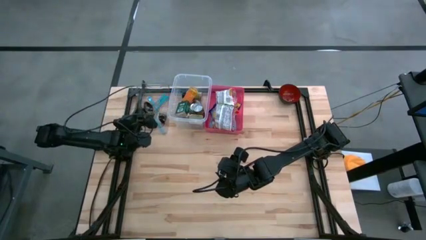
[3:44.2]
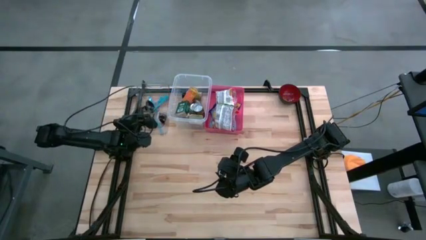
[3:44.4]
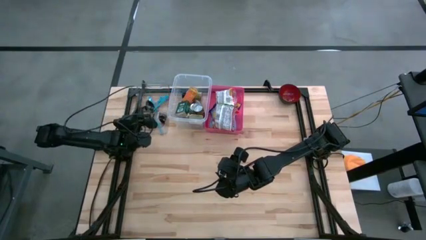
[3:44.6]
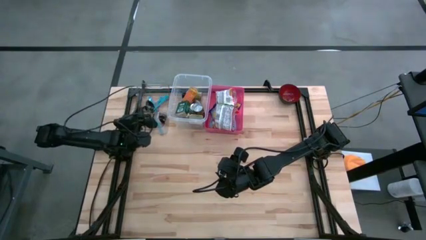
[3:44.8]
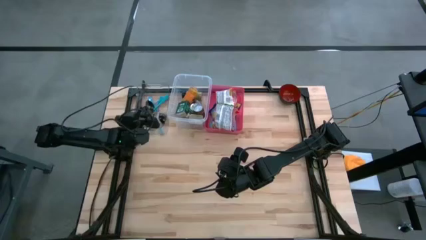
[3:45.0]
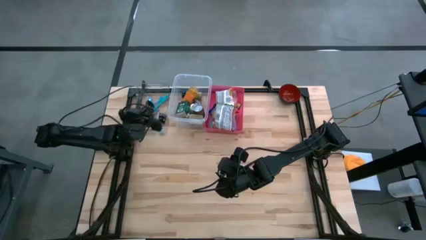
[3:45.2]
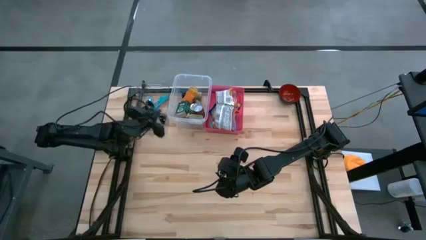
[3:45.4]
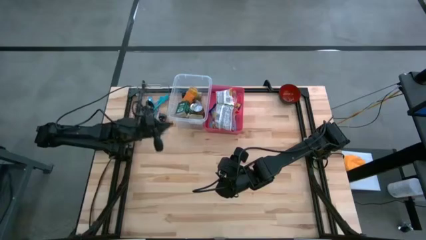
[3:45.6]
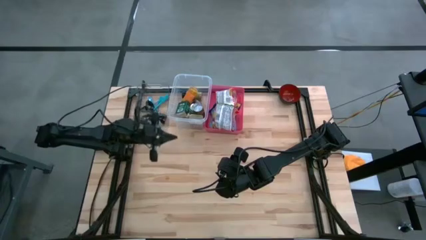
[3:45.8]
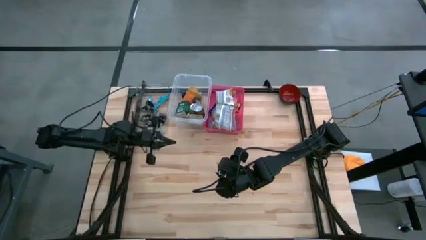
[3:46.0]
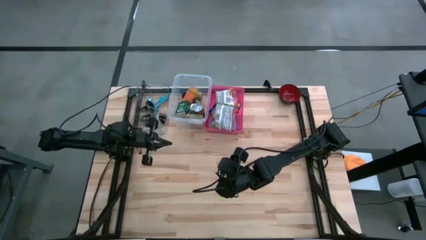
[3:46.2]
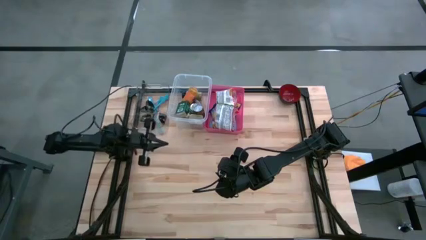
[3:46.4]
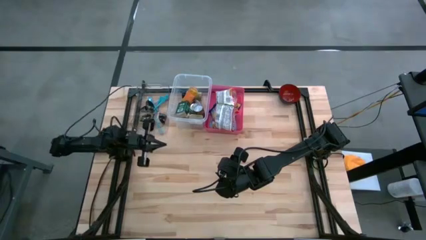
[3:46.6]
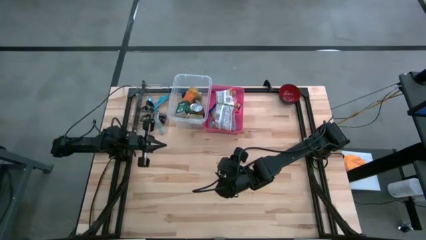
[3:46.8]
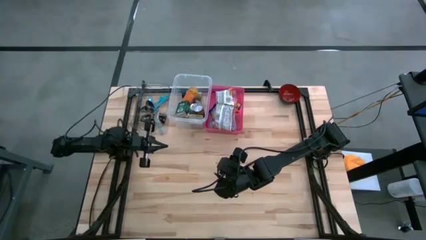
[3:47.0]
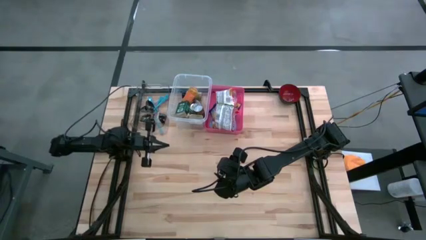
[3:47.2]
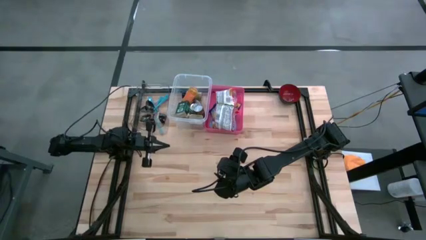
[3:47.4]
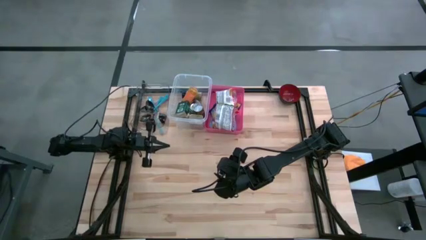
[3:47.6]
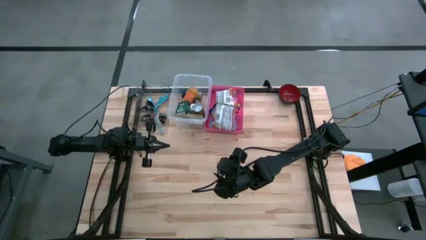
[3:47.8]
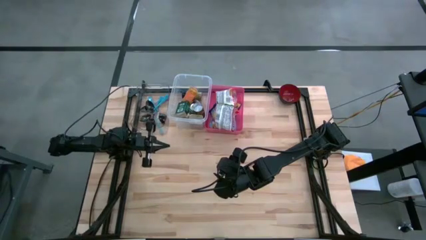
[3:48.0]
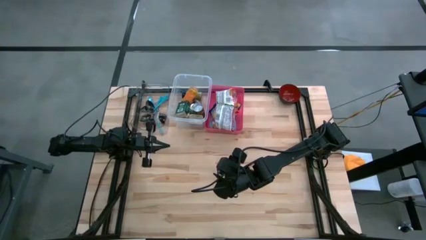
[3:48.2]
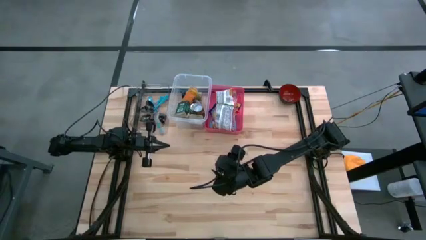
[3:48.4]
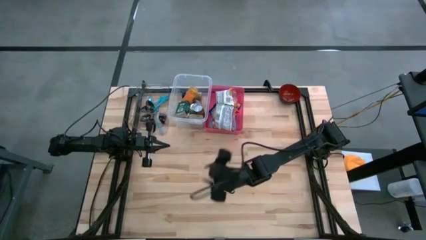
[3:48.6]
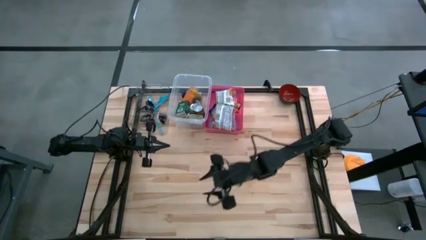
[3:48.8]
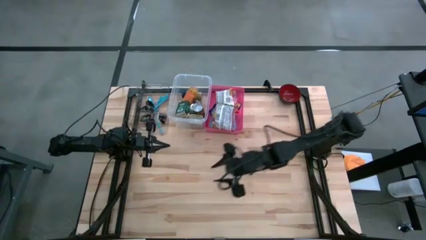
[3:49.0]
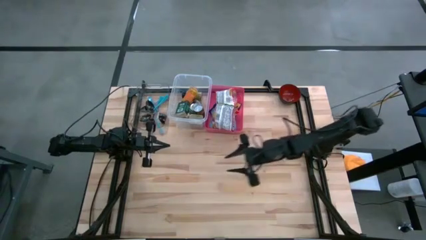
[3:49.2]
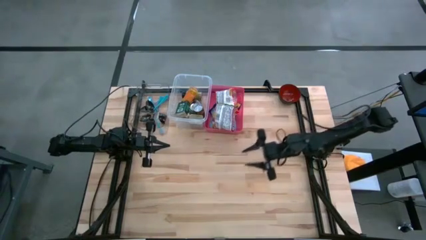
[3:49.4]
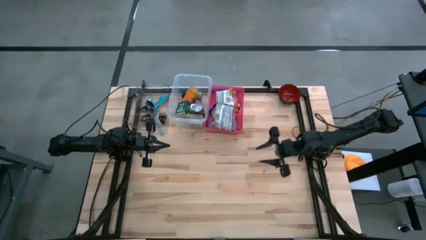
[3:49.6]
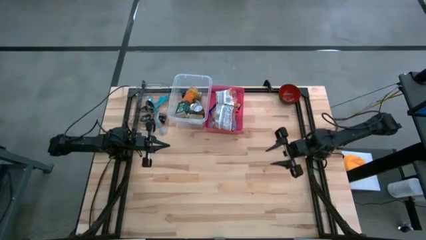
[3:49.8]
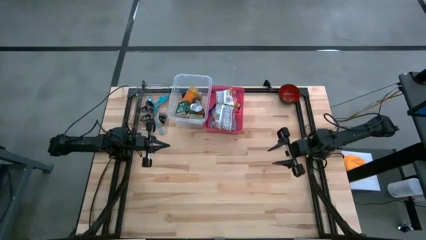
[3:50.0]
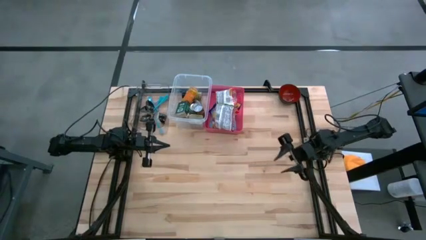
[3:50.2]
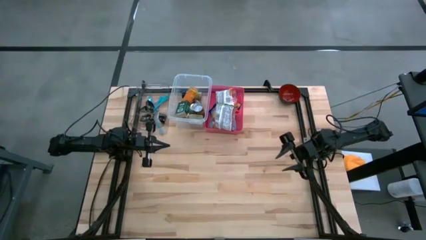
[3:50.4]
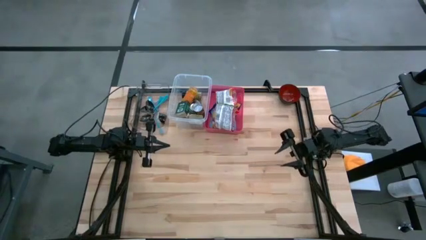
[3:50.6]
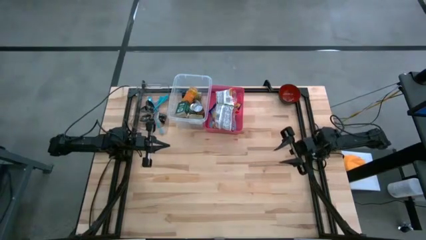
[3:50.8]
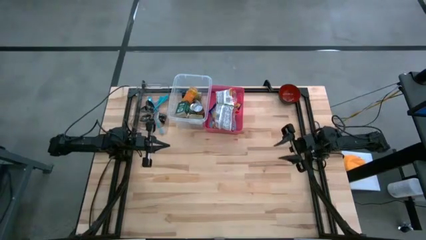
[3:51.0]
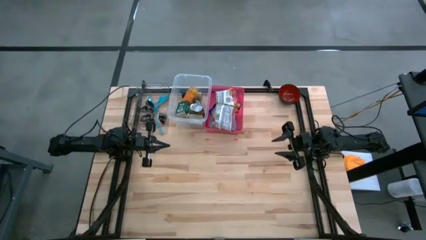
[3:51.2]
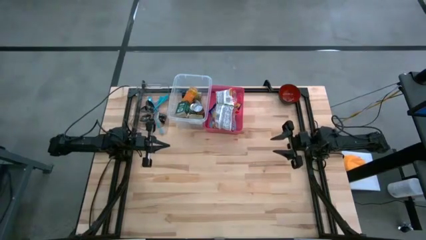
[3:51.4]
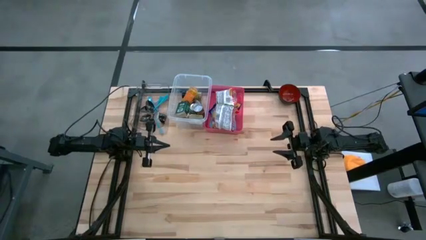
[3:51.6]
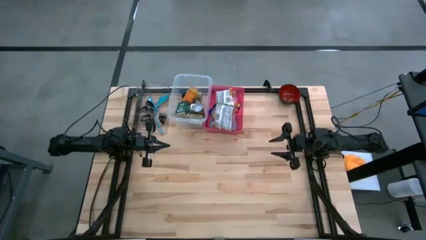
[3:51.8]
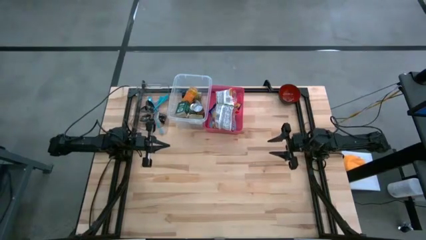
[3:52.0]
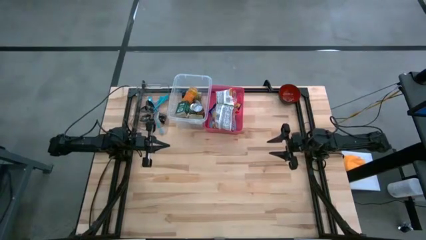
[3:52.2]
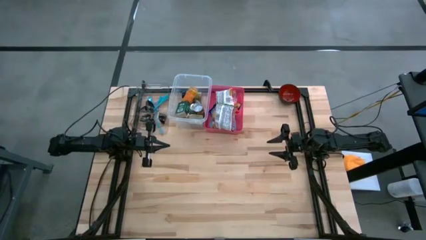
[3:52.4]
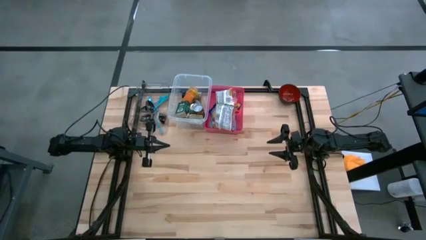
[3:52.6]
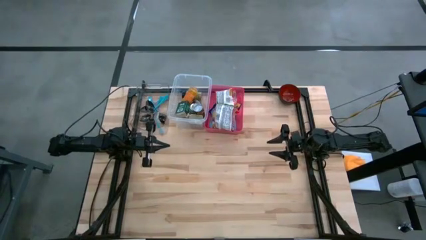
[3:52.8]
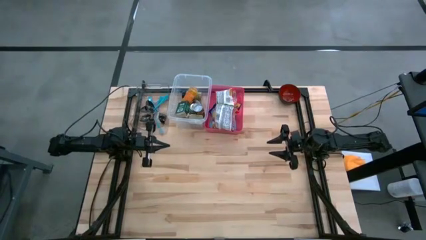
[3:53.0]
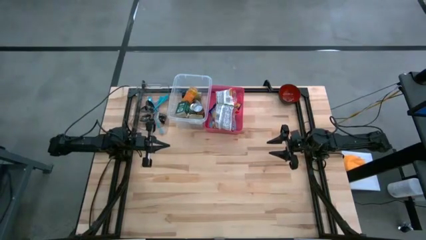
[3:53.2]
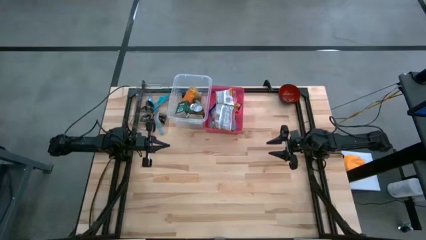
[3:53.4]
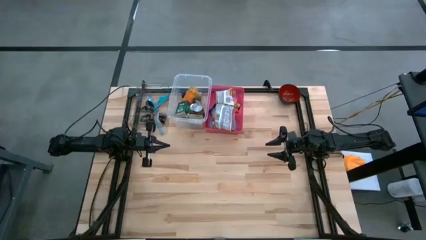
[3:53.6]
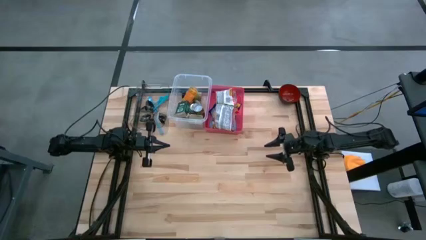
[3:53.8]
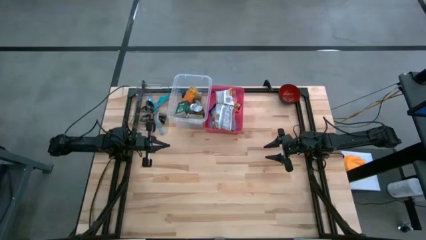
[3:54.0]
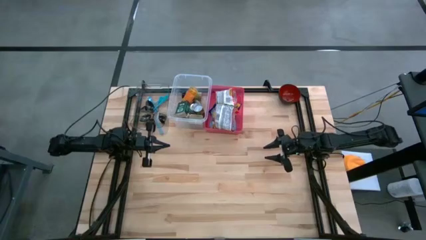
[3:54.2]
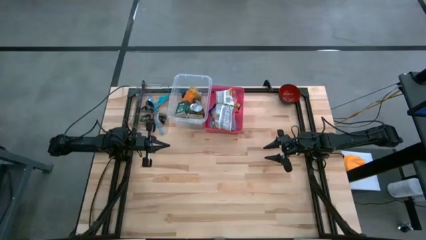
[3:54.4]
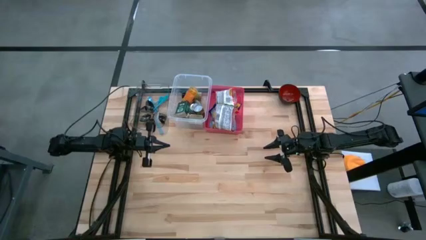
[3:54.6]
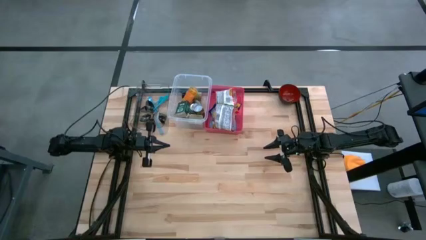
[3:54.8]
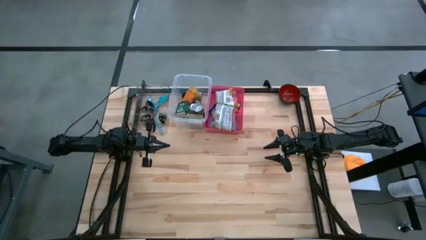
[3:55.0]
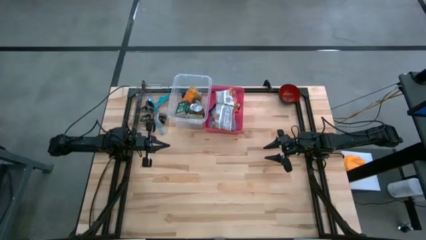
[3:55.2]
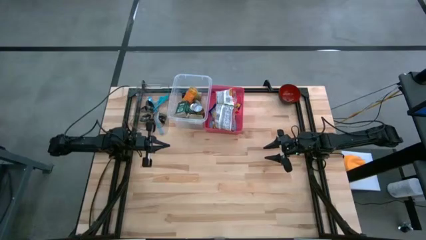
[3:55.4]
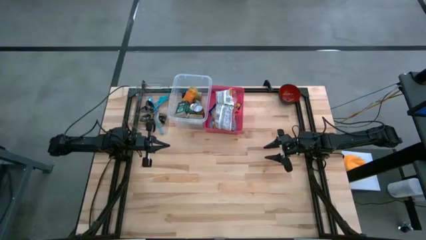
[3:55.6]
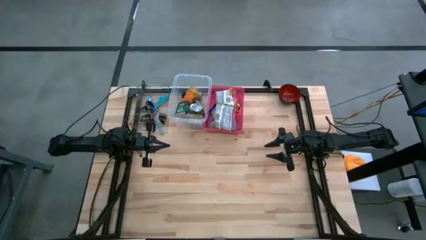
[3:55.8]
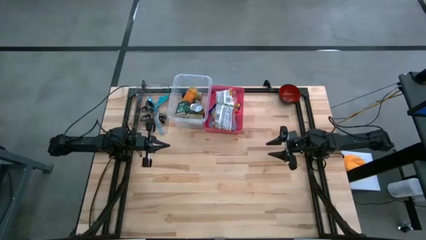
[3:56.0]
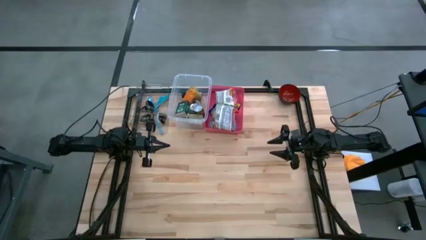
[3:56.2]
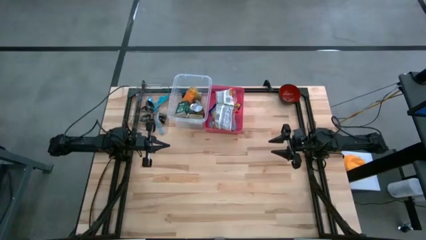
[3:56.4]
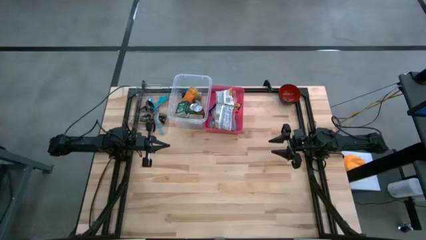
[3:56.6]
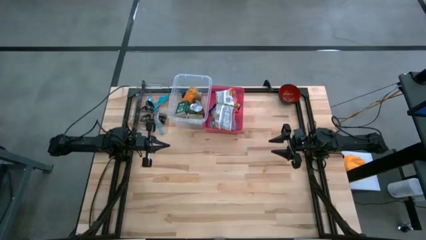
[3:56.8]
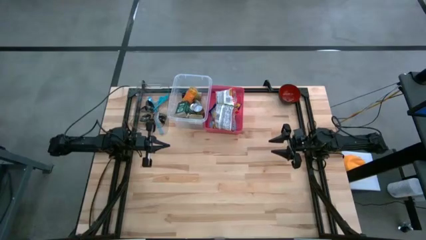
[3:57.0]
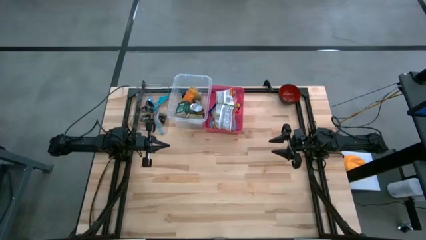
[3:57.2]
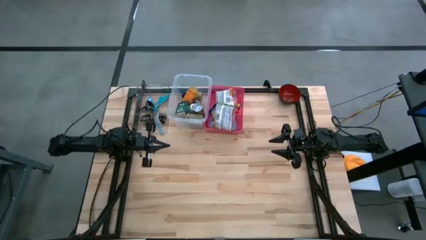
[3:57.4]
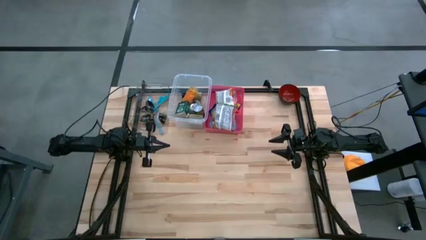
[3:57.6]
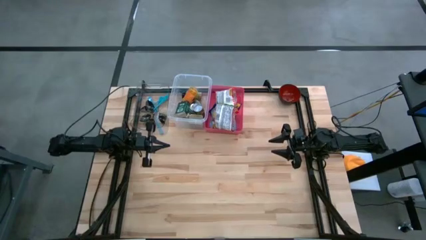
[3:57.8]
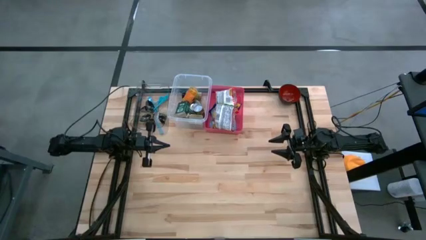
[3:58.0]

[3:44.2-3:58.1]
Return to Home Position
